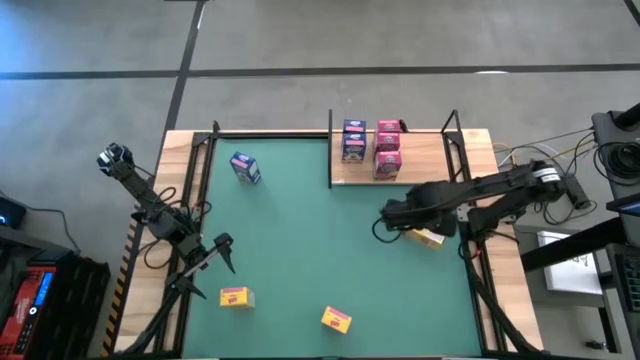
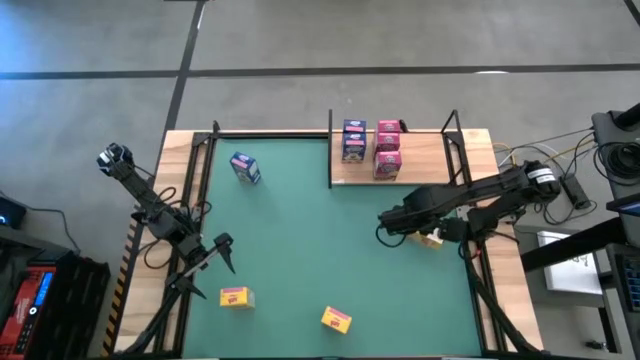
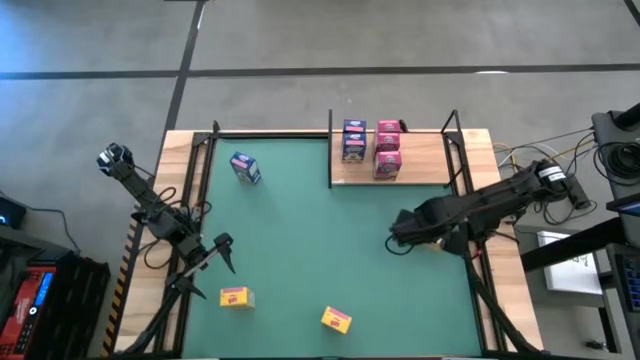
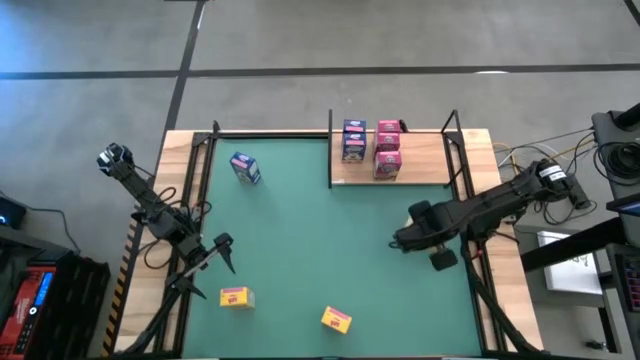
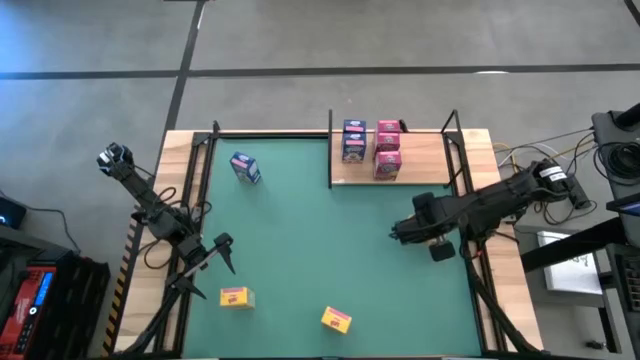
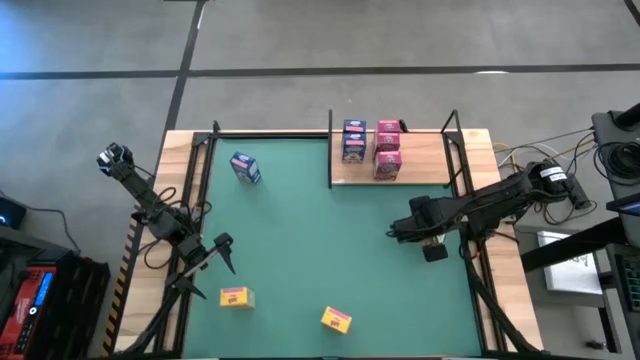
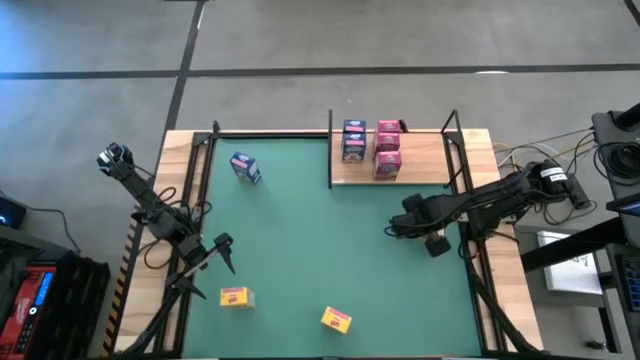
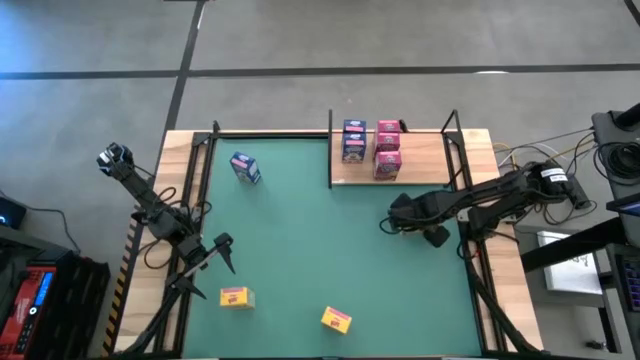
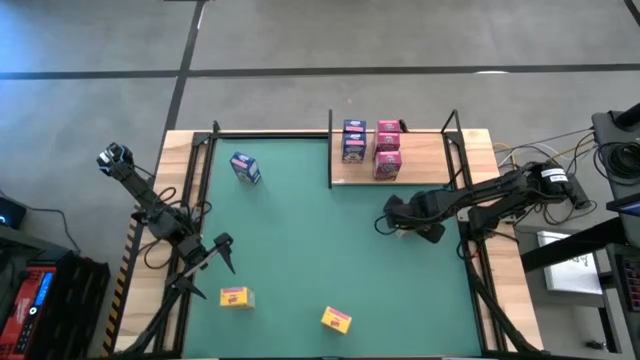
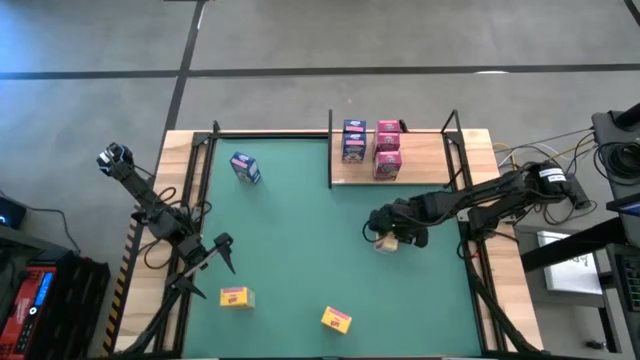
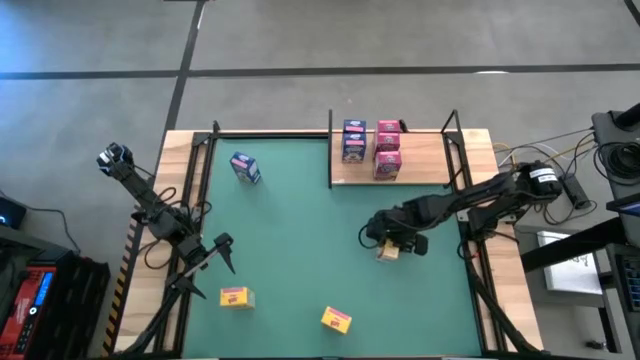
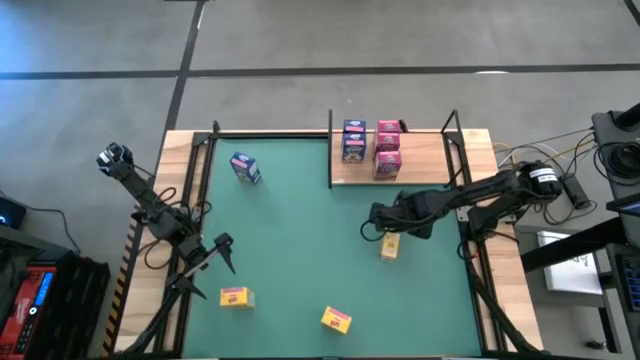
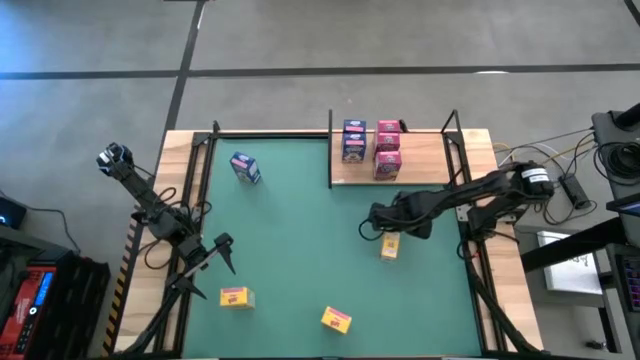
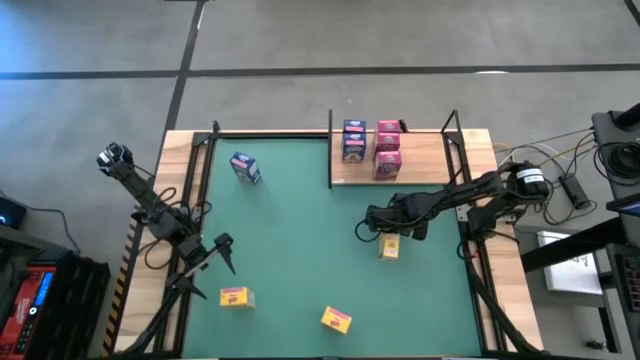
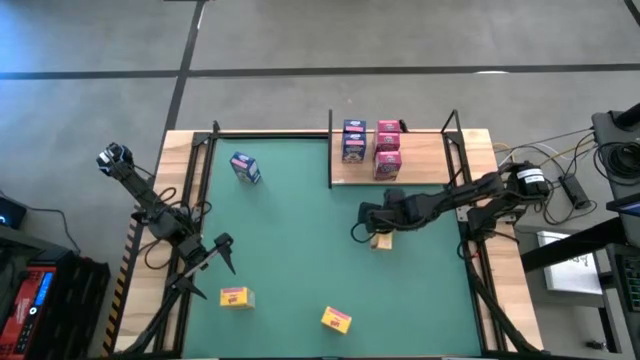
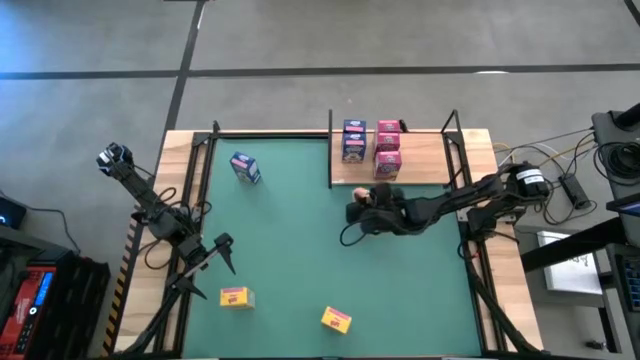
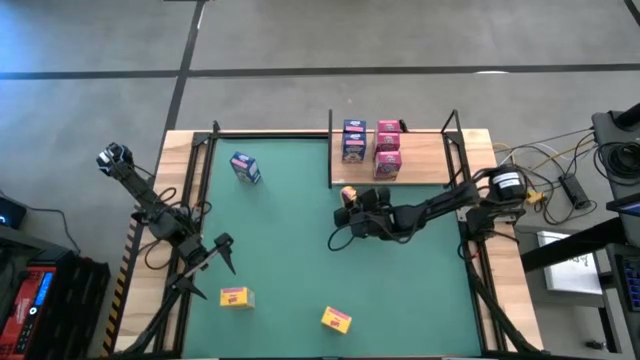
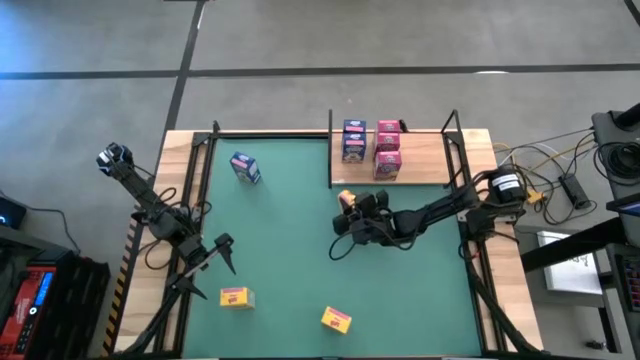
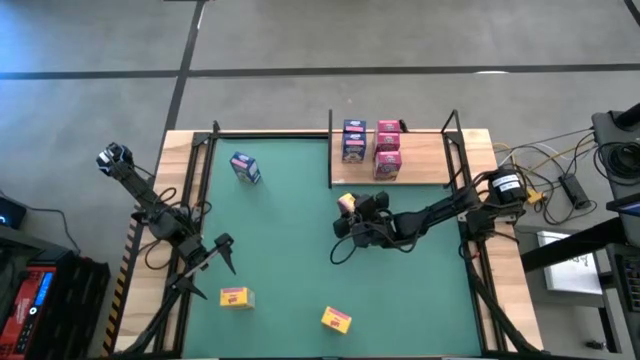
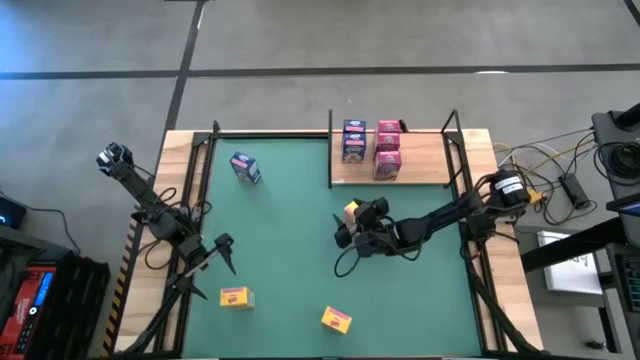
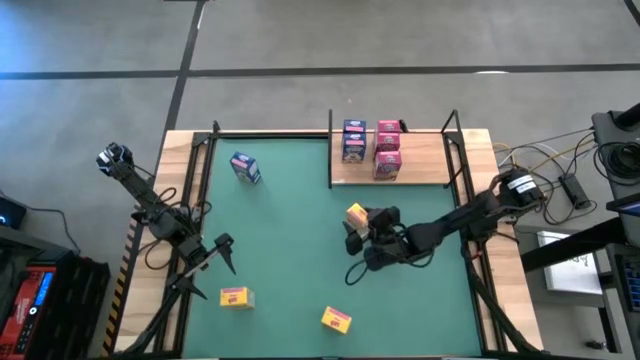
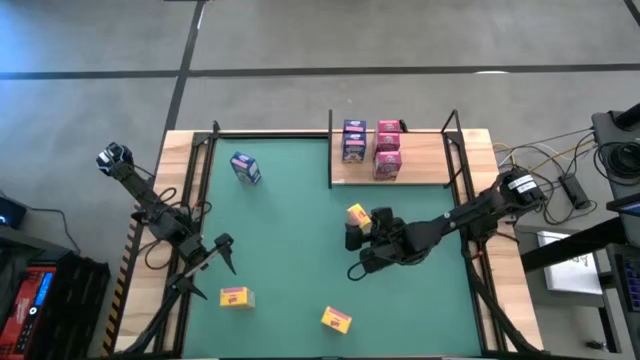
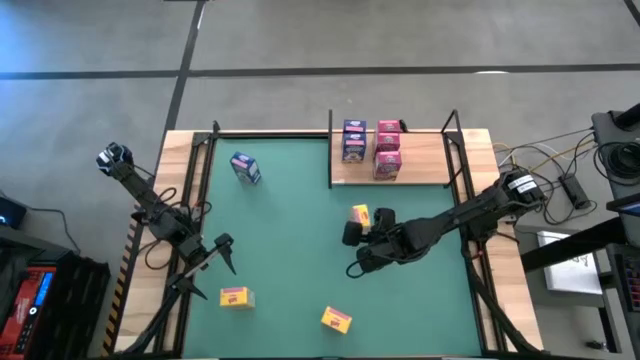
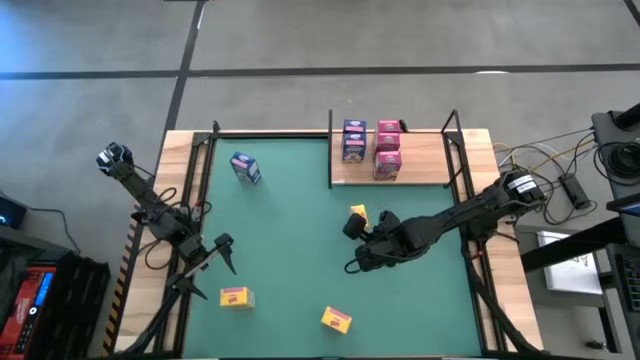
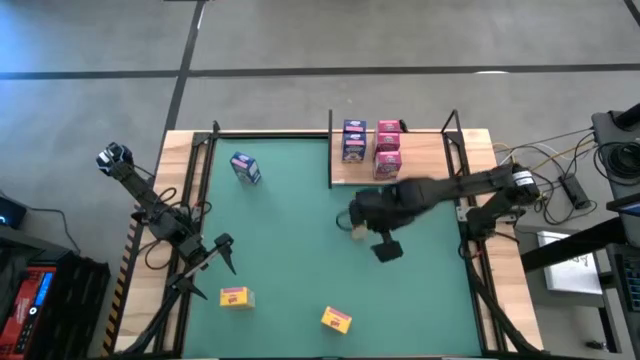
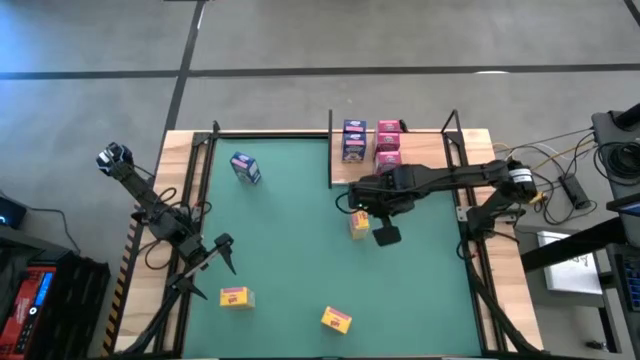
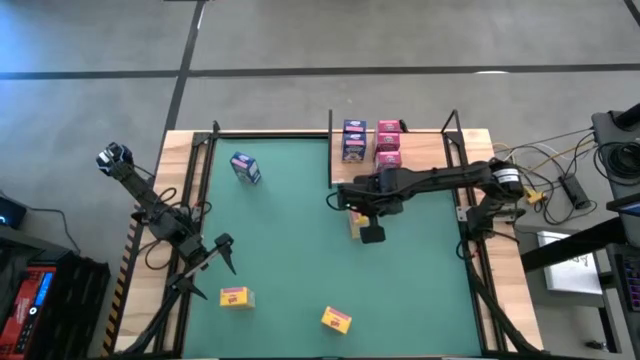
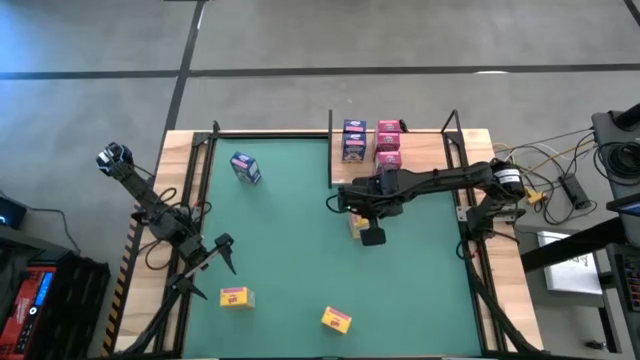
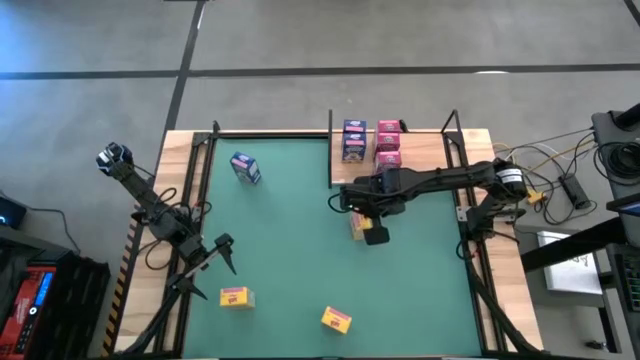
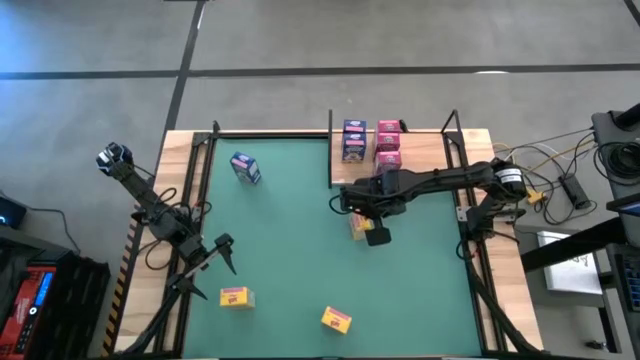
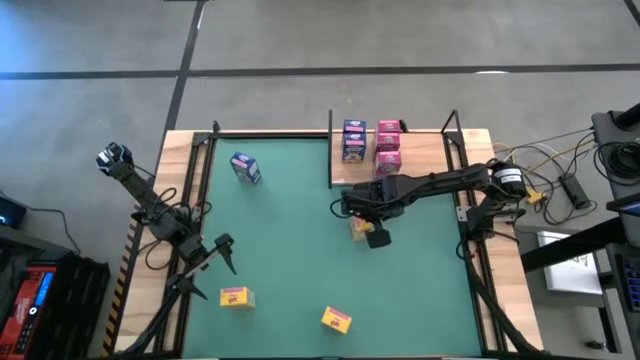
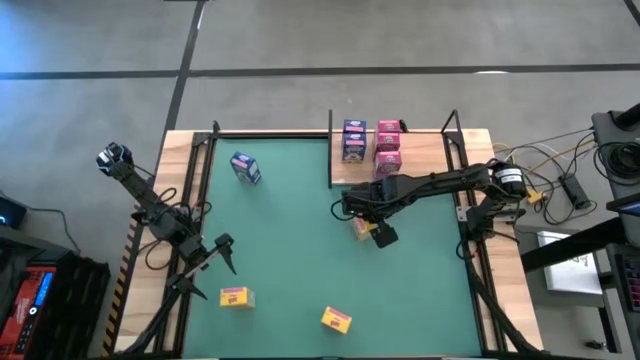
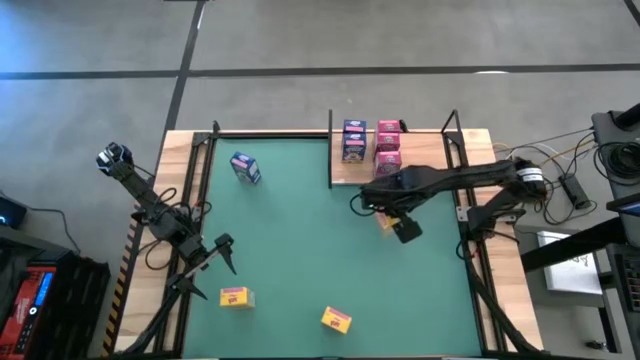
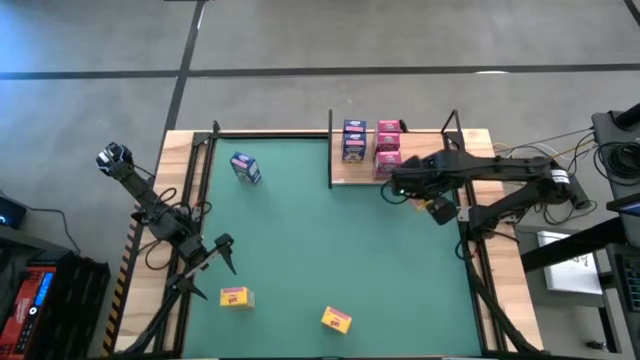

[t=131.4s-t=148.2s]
Task: Stack cereal on shelf
Put the right yellow cereal box onto the shelf

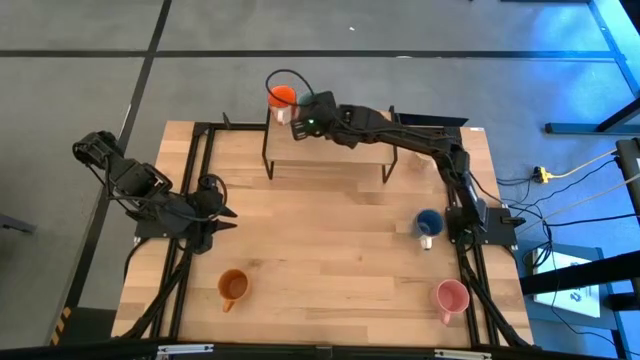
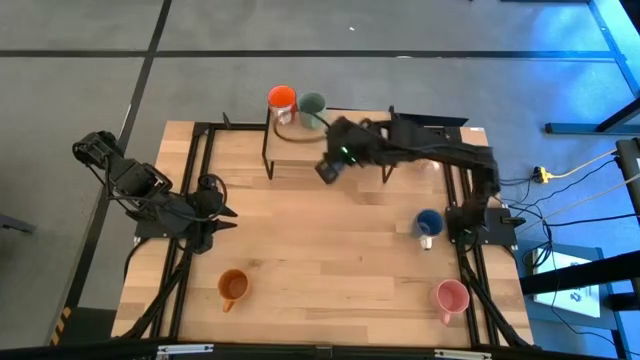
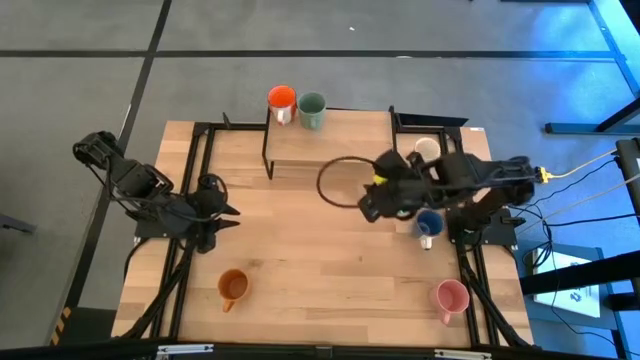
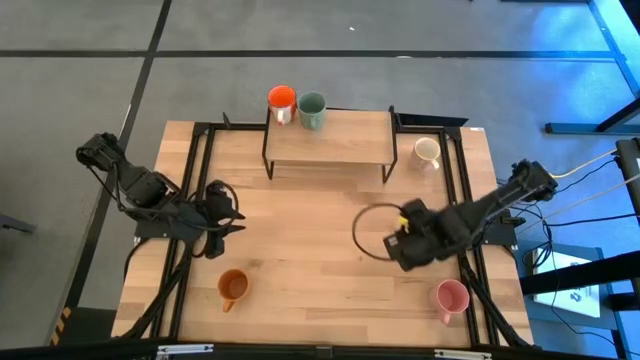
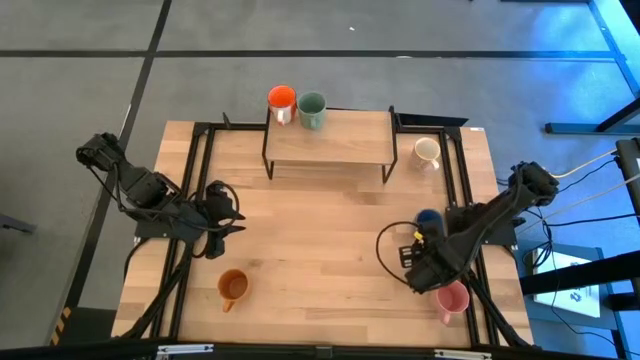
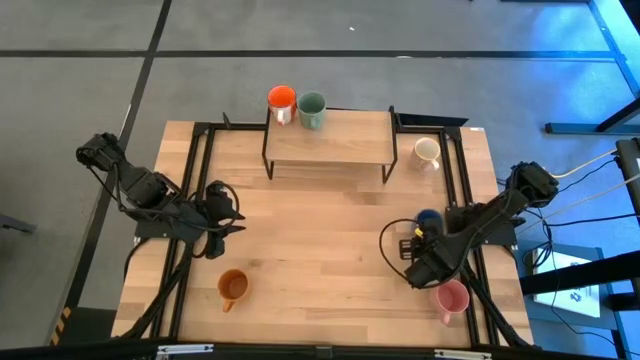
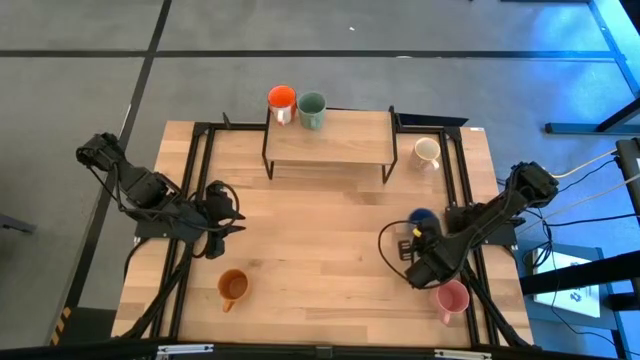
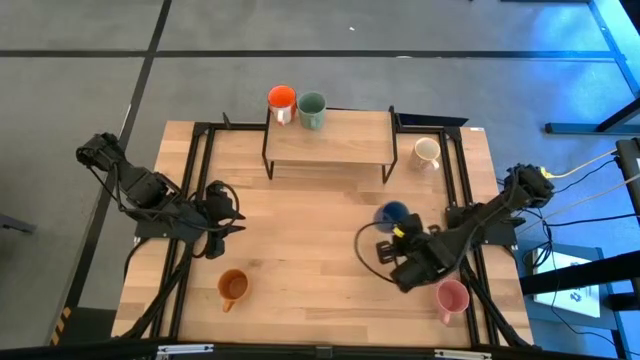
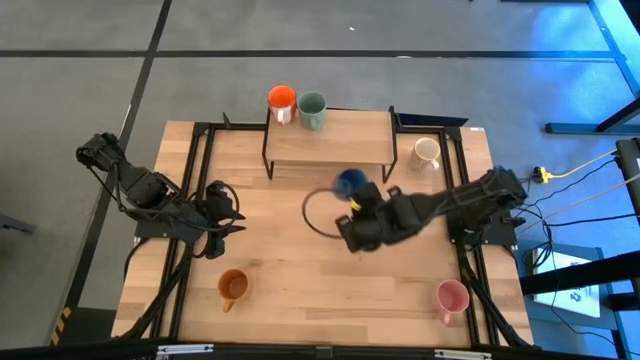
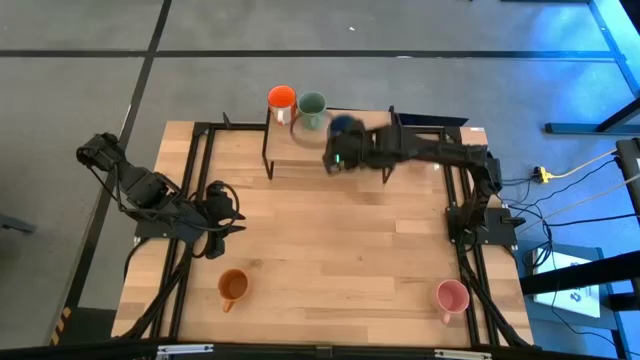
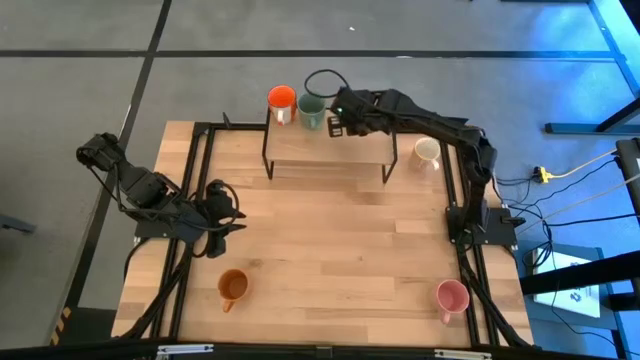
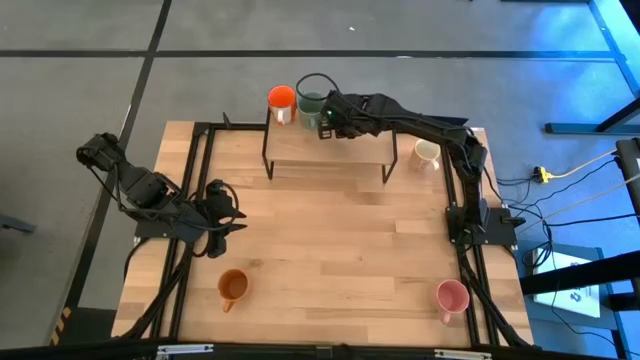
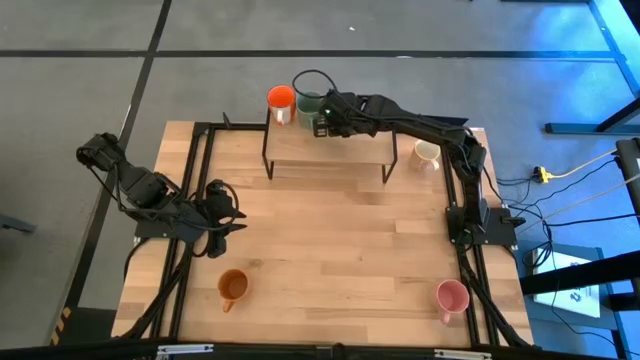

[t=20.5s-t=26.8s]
Task: Place coffee mugs
Put the blue mug on the shelf
